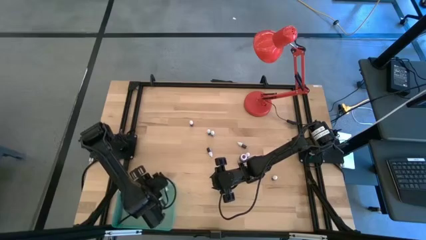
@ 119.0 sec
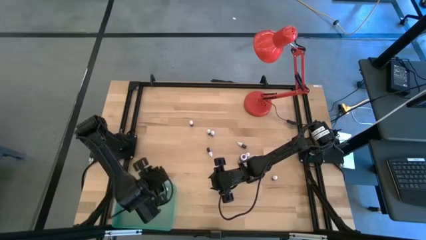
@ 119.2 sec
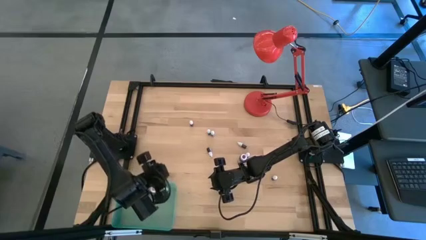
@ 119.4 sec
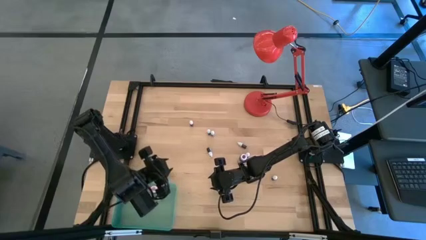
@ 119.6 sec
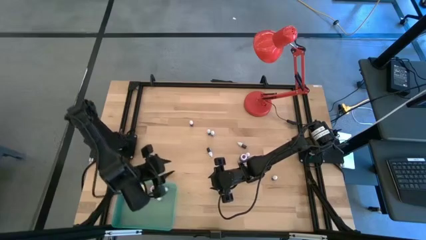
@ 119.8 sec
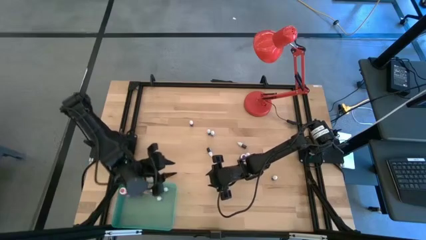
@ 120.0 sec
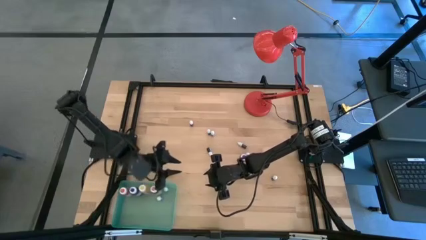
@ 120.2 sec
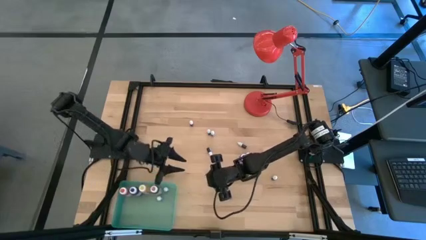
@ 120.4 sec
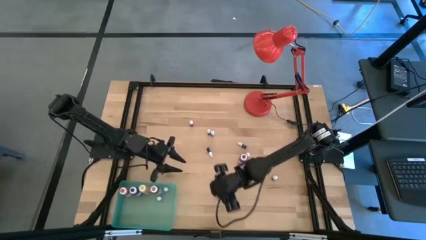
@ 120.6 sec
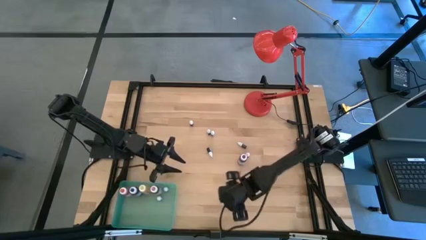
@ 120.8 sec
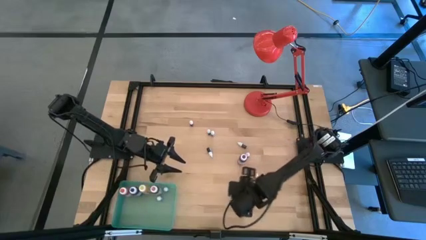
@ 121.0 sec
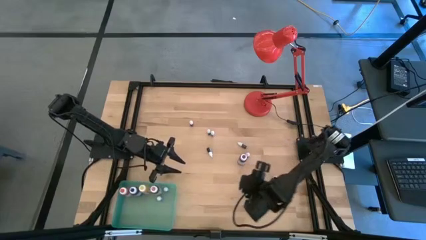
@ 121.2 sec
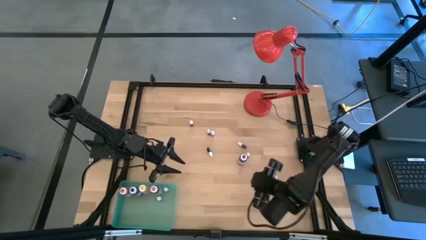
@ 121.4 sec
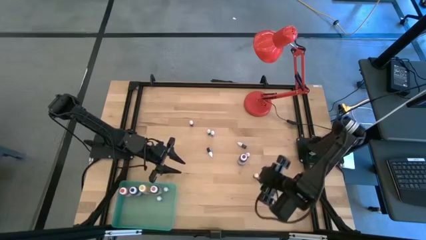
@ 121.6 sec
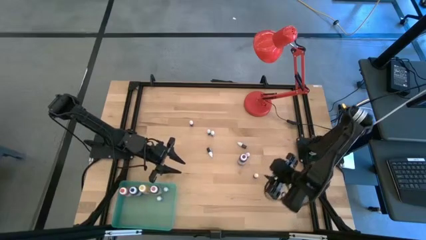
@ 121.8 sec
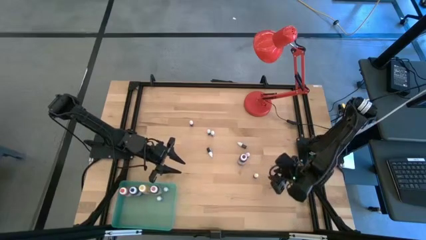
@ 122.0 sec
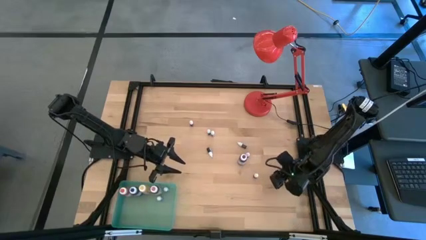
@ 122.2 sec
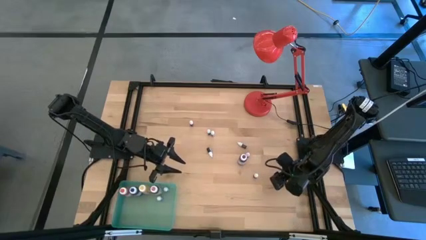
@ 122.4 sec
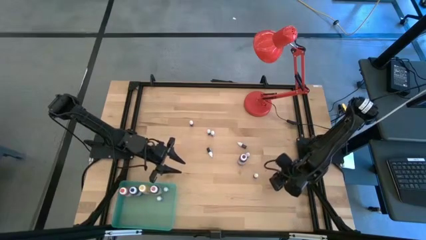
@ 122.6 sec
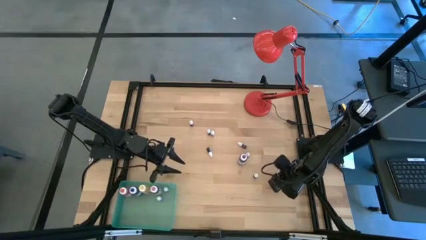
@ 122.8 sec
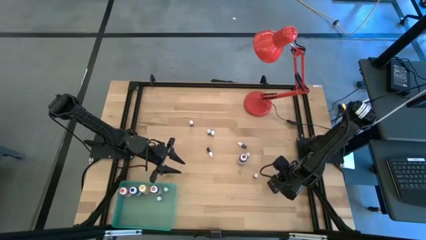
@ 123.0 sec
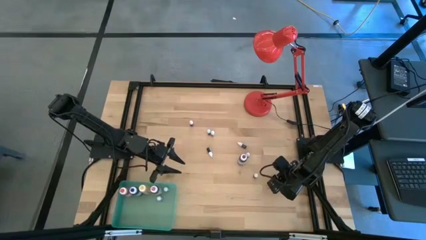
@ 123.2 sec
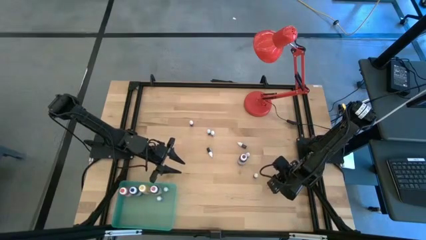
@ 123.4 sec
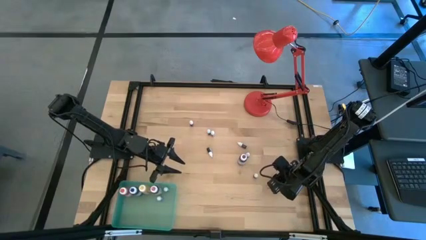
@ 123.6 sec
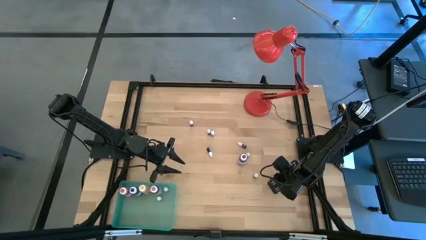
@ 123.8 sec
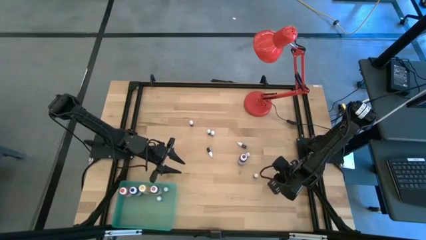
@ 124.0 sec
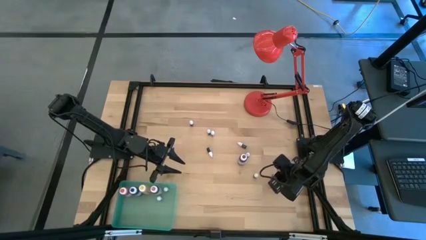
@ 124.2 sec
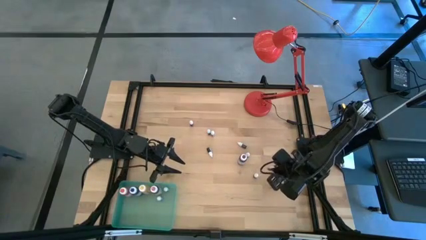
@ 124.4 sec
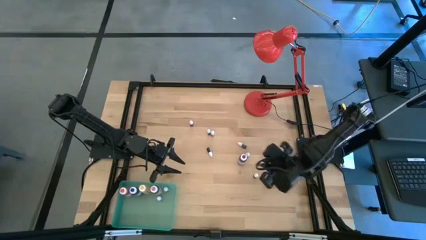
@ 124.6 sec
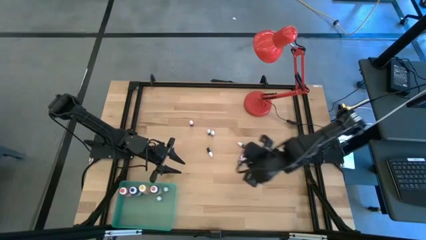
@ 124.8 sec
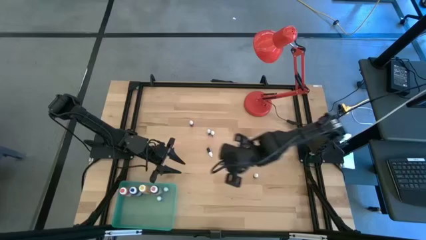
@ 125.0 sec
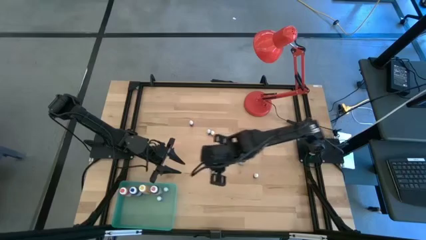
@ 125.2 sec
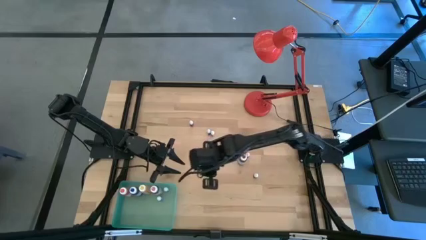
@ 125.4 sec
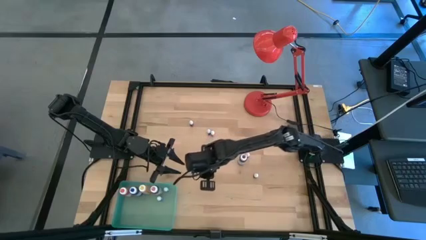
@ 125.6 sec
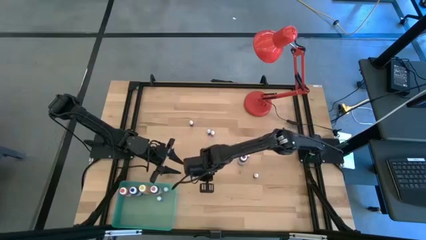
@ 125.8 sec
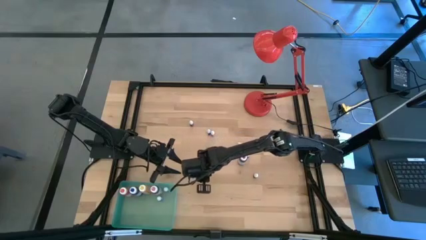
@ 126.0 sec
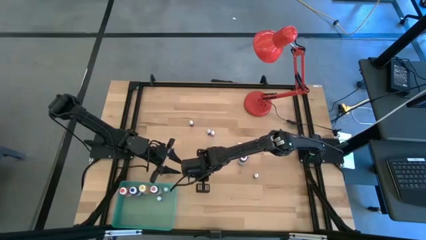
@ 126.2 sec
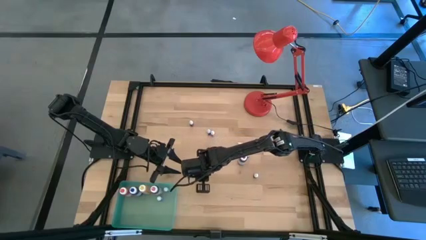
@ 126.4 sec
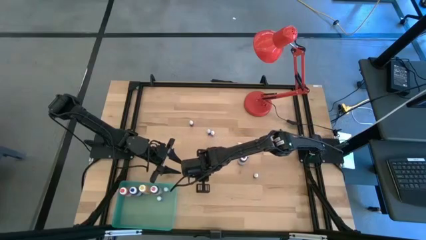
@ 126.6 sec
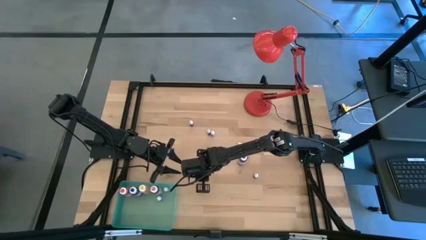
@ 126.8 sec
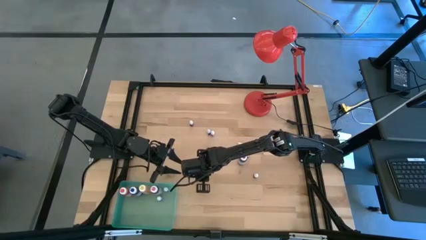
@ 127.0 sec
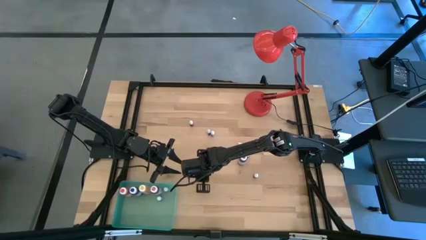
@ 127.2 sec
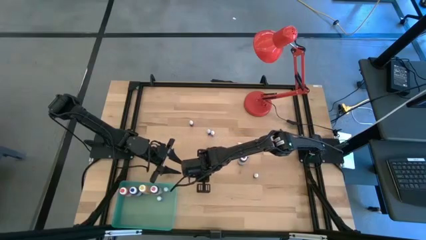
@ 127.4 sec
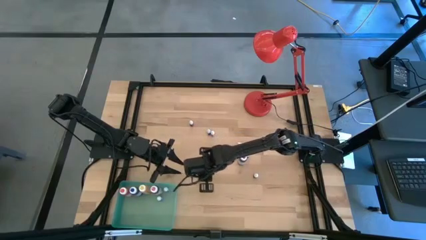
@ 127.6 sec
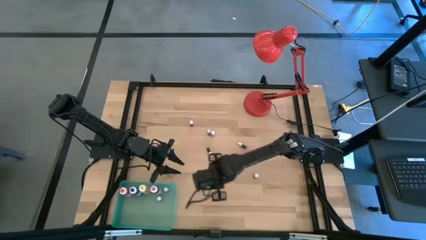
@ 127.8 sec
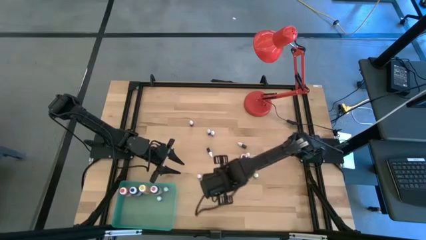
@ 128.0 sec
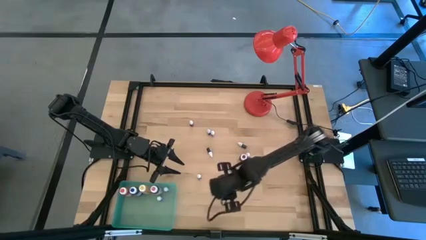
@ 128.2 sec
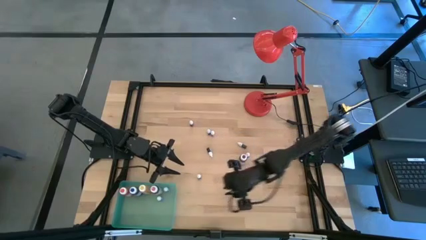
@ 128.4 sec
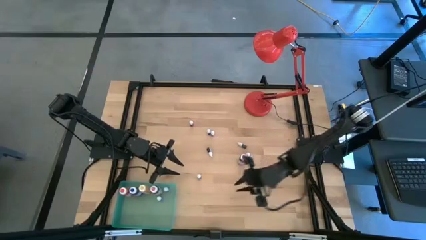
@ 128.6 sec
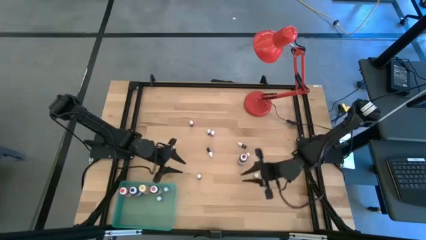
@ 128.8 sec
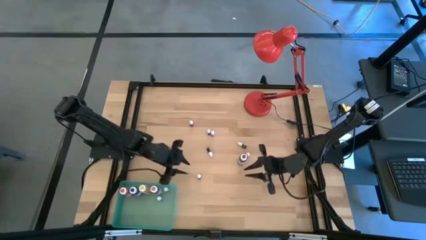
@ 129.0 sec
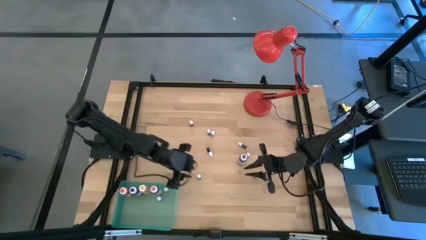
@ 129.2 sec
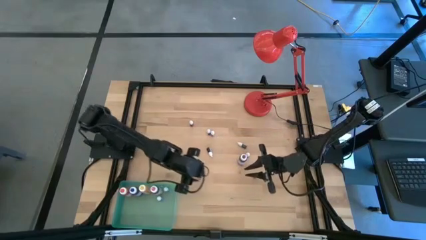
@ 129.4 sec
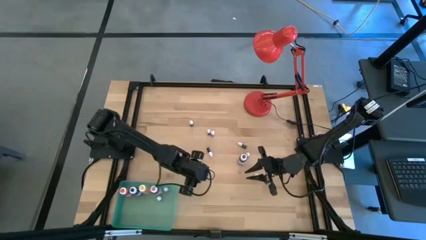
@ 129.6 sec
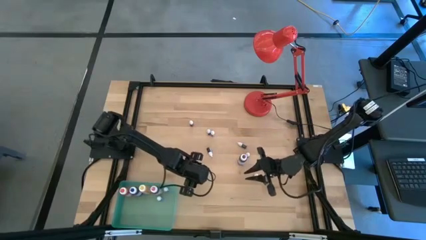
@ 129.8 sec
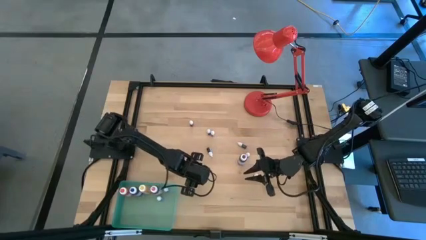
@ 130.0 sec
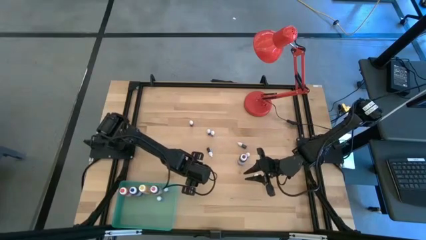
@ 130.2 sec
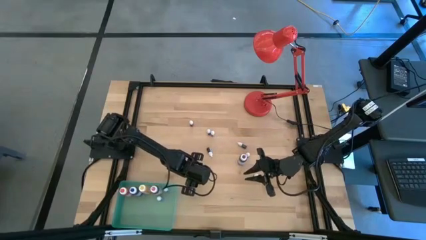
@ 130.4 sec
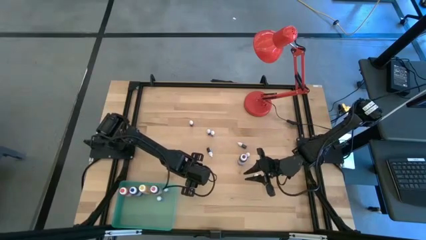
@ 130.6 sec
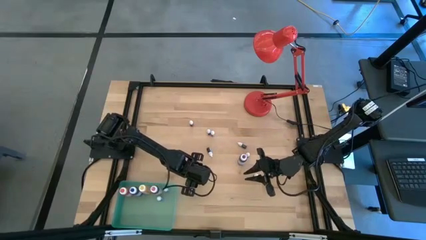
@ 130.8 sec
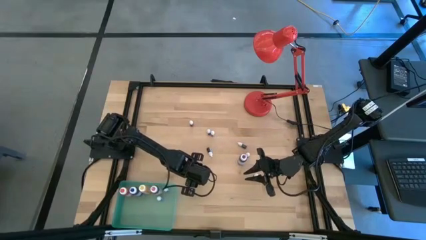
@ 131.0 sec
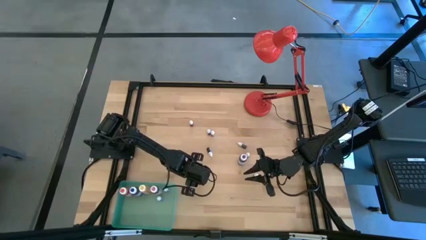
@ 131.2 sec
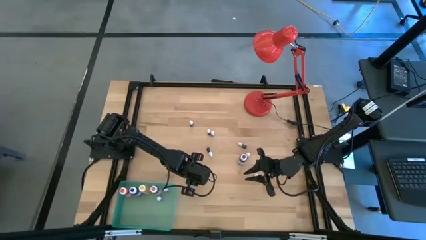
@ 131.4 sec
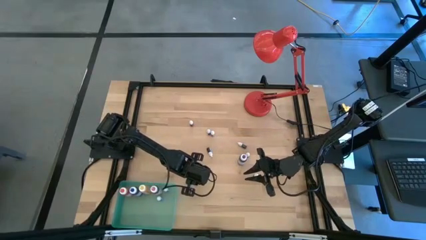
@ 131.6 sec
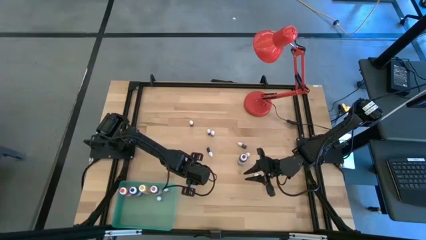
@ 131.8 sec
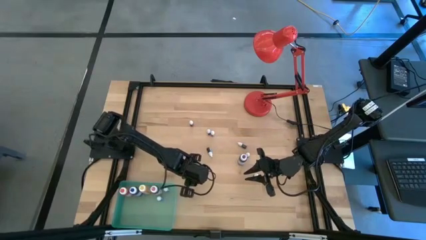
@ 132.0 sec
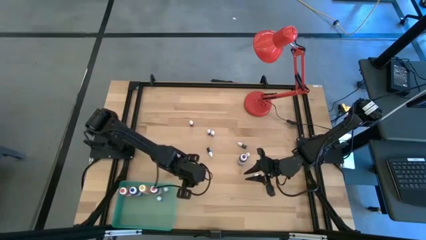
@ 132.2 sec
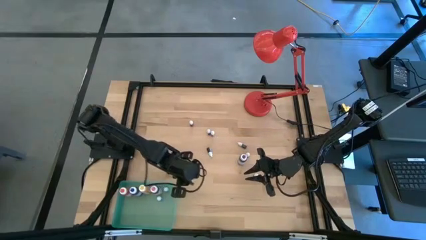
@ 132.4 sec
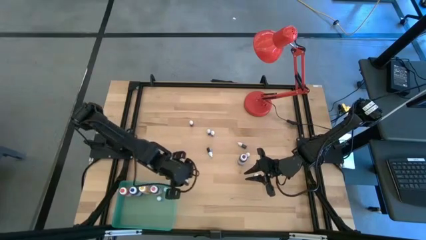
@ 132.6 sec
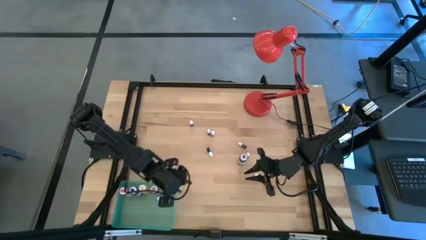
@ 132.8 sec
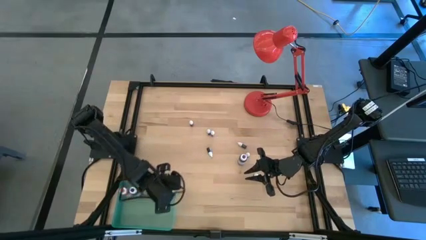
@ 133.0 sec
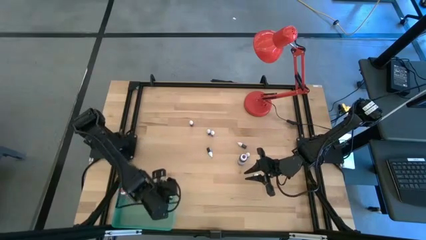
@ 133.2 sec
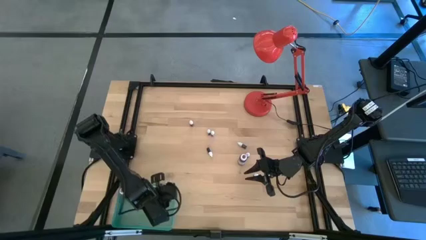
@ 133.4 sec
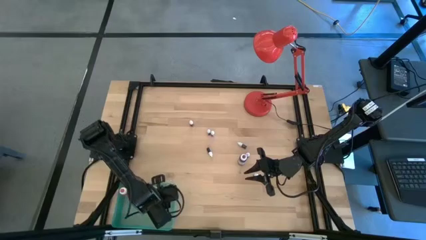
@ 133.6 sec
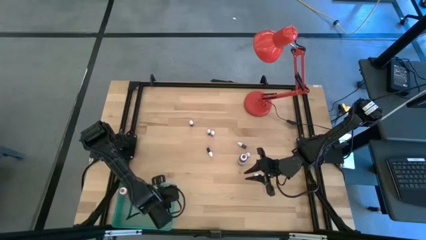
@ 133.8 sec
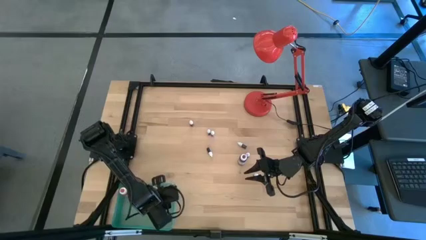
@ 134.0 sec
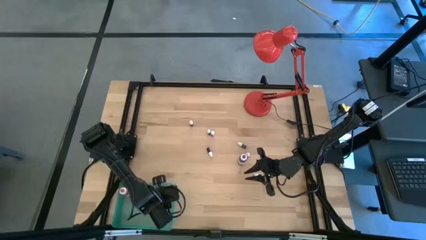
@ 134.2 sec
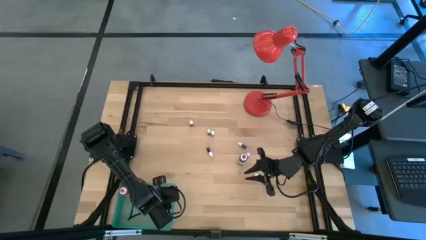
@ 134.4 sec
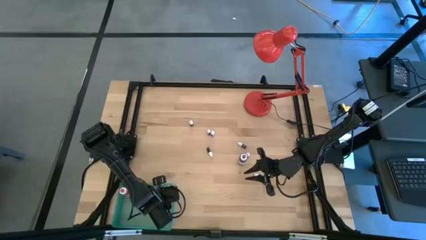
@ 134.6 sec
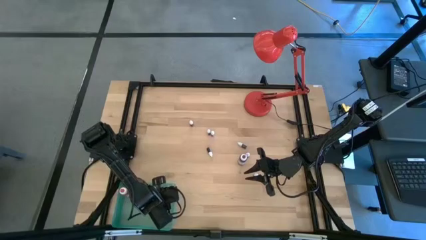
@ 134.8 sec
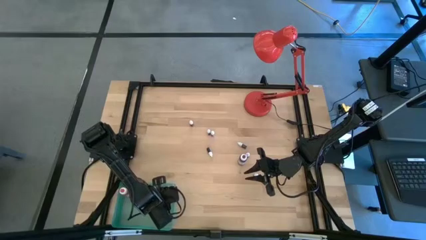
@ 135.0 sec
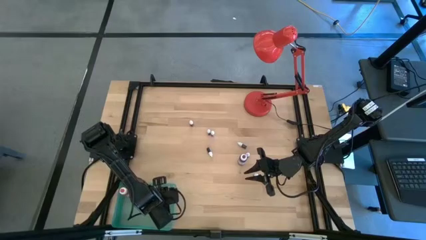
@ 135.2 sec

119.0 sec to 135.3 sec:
Task: Pick & Place food coloring
Put the orange food coloring into the blue bin
